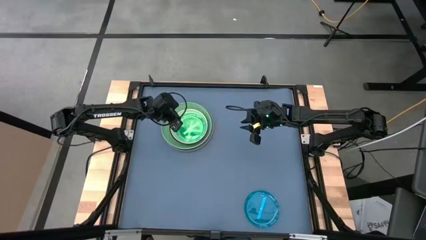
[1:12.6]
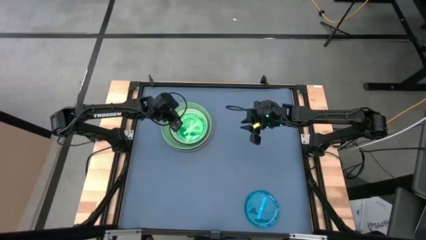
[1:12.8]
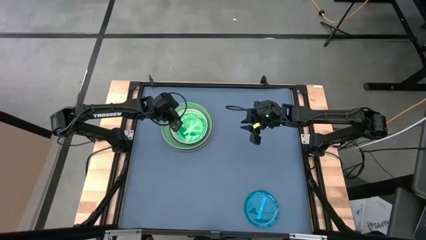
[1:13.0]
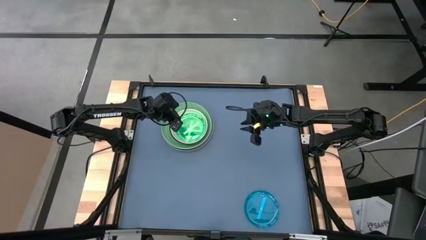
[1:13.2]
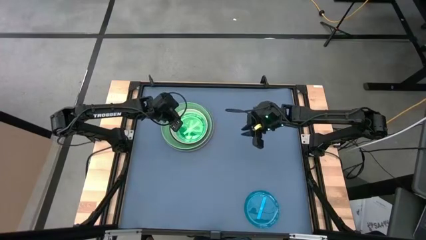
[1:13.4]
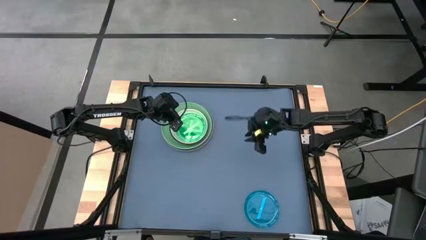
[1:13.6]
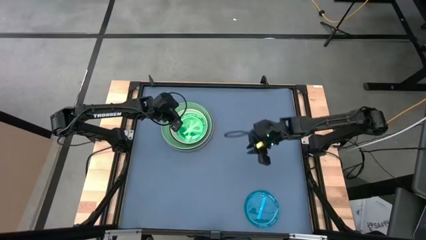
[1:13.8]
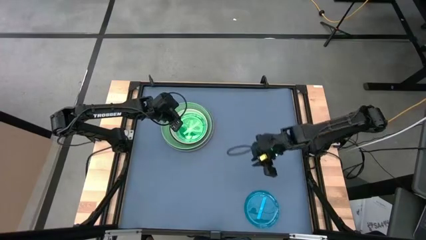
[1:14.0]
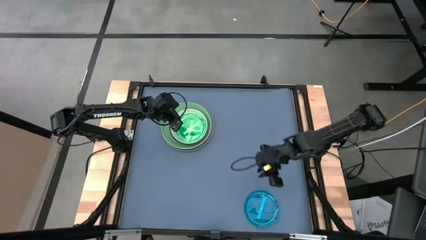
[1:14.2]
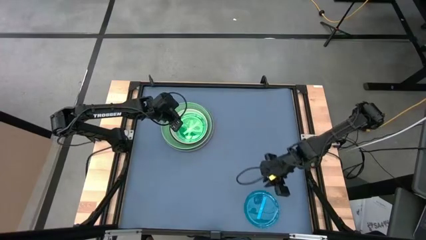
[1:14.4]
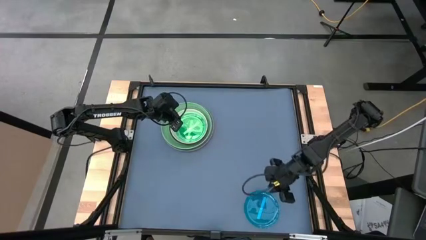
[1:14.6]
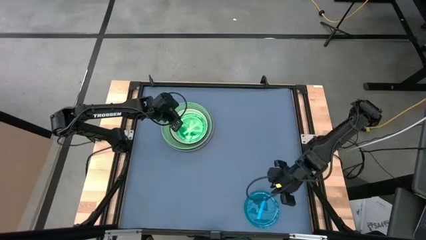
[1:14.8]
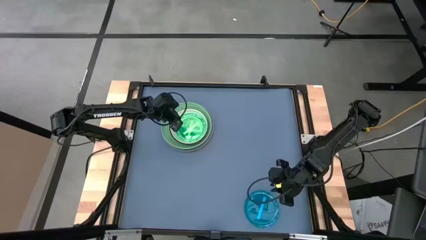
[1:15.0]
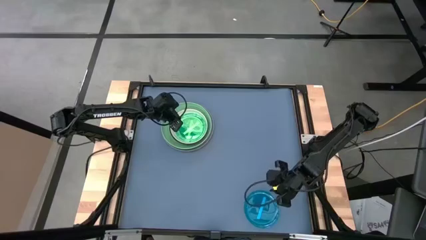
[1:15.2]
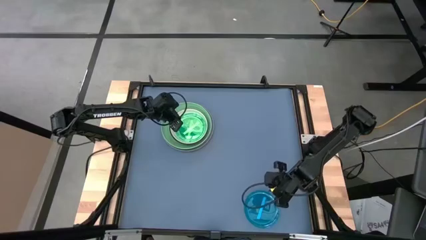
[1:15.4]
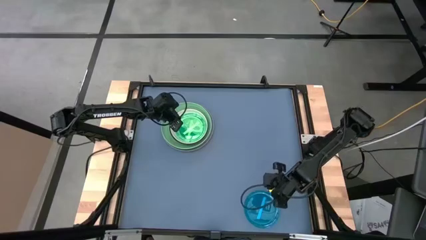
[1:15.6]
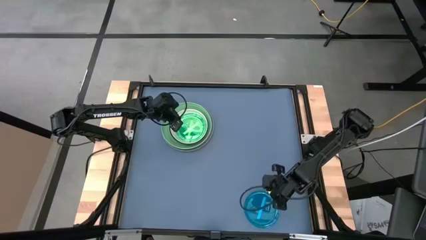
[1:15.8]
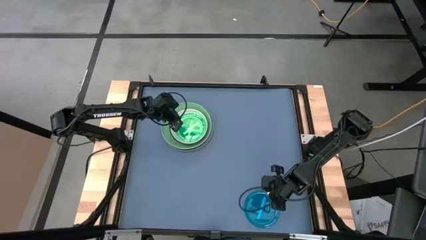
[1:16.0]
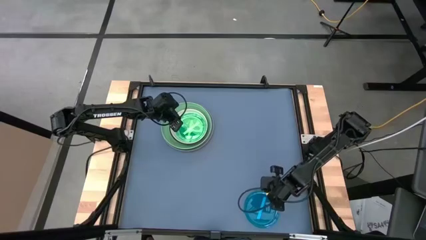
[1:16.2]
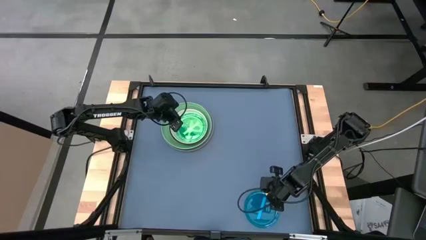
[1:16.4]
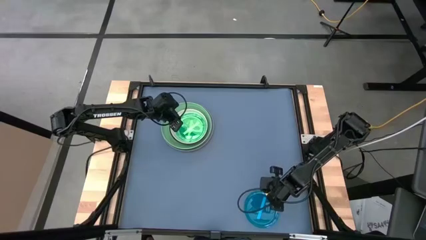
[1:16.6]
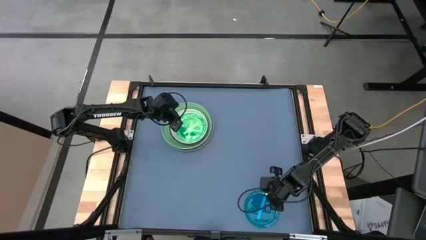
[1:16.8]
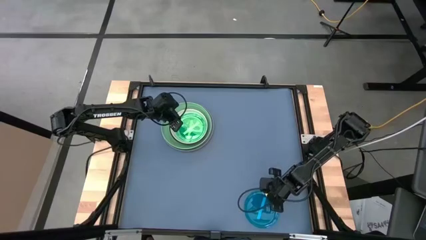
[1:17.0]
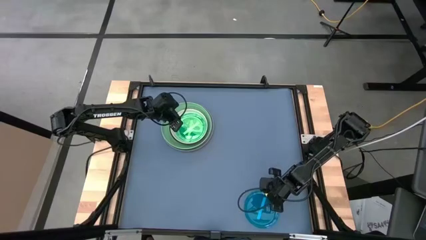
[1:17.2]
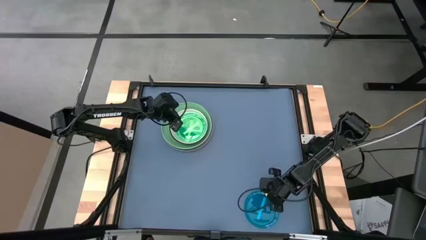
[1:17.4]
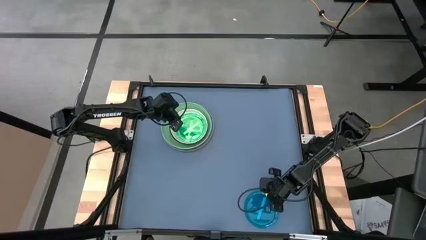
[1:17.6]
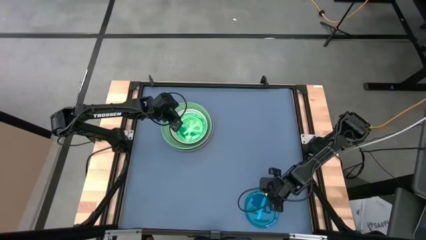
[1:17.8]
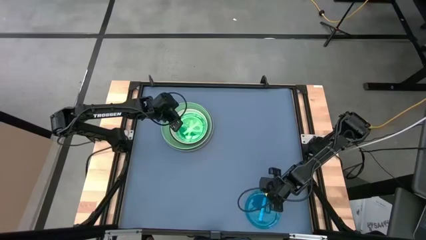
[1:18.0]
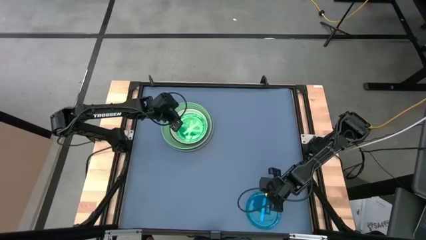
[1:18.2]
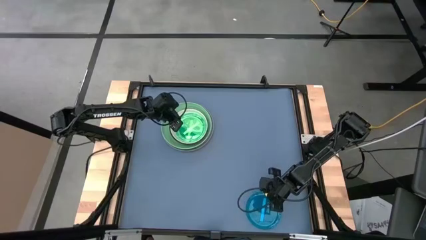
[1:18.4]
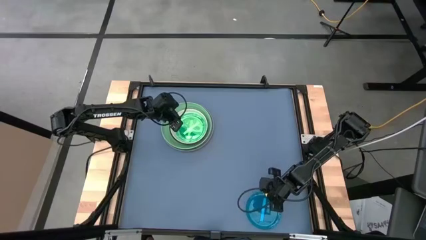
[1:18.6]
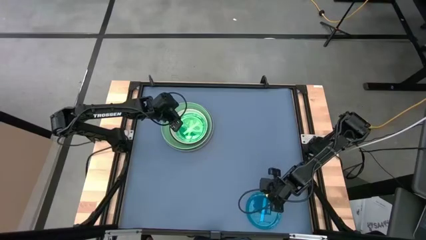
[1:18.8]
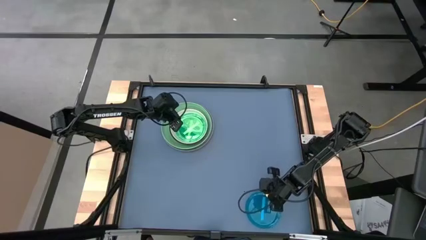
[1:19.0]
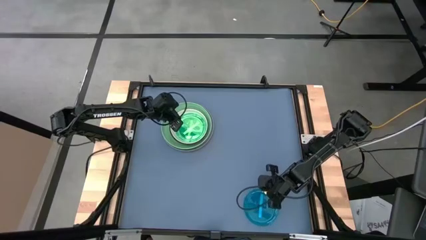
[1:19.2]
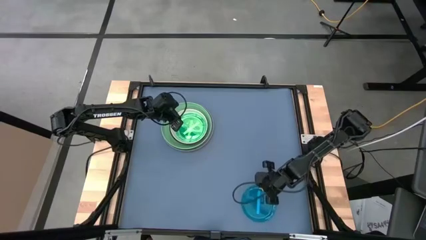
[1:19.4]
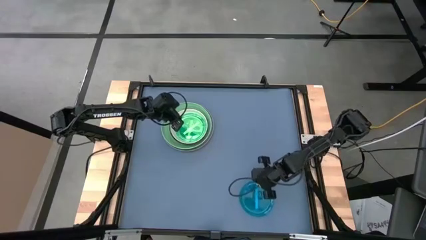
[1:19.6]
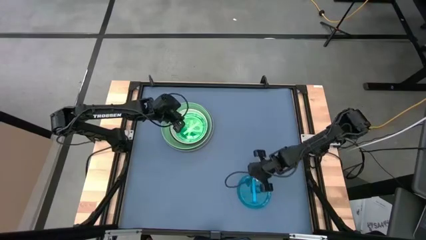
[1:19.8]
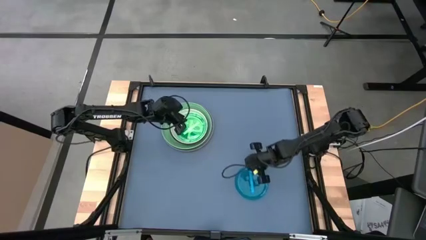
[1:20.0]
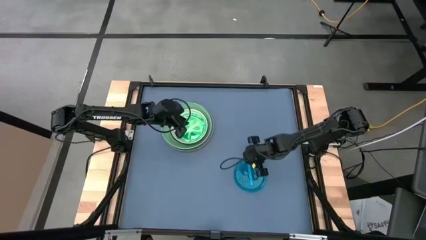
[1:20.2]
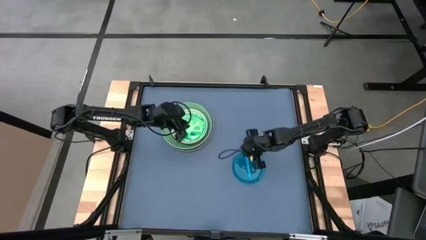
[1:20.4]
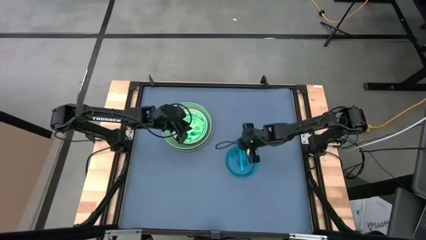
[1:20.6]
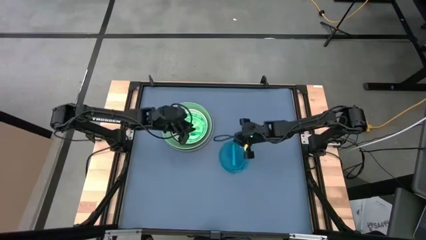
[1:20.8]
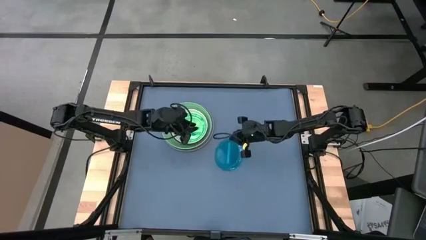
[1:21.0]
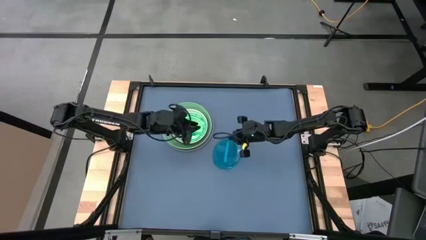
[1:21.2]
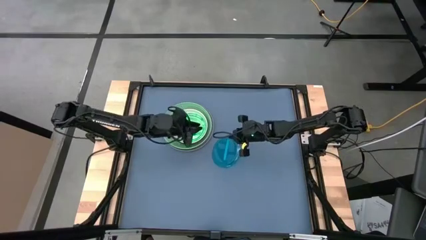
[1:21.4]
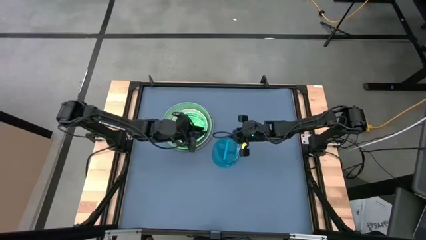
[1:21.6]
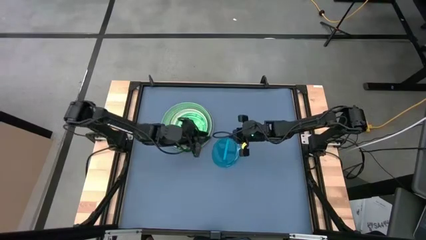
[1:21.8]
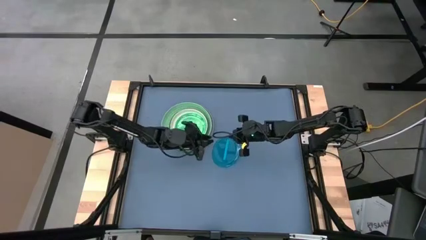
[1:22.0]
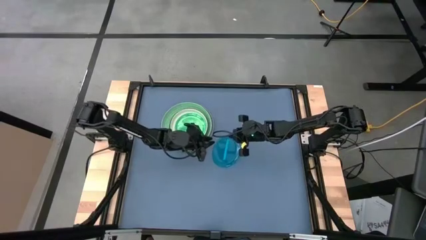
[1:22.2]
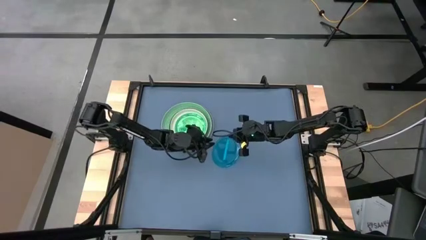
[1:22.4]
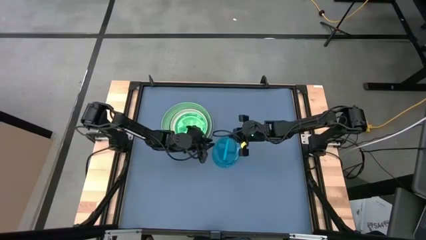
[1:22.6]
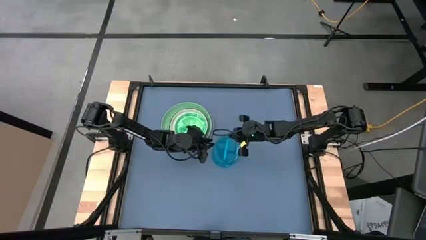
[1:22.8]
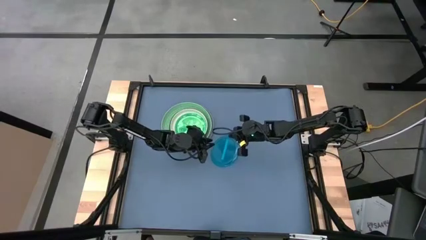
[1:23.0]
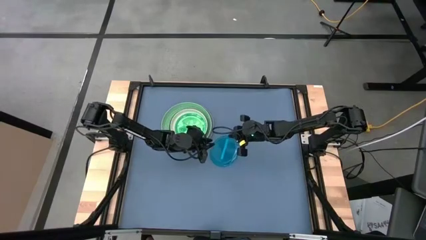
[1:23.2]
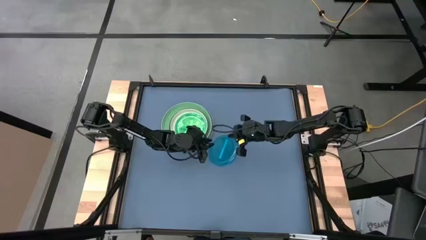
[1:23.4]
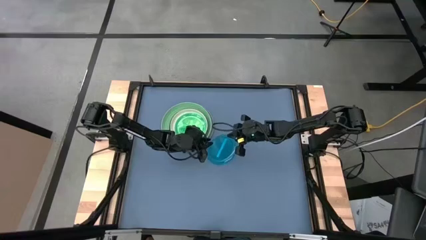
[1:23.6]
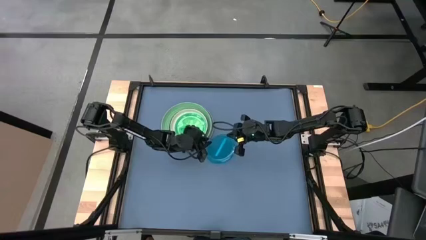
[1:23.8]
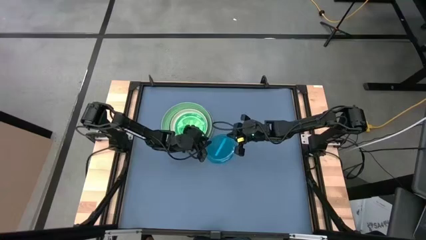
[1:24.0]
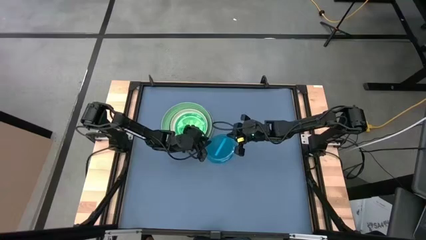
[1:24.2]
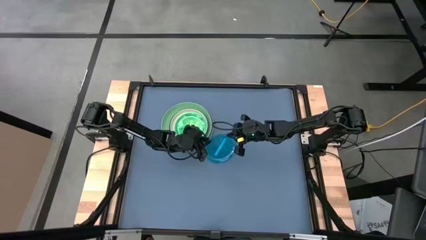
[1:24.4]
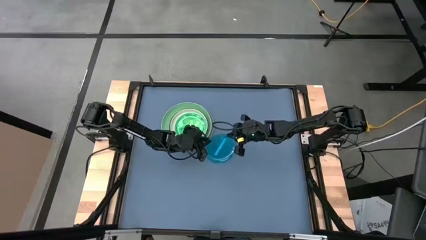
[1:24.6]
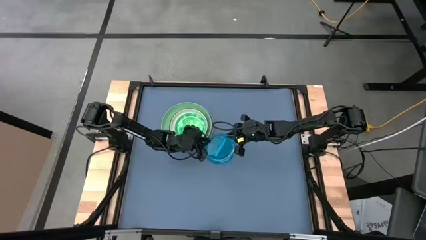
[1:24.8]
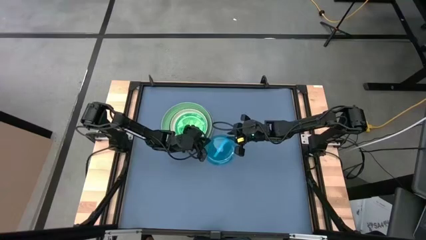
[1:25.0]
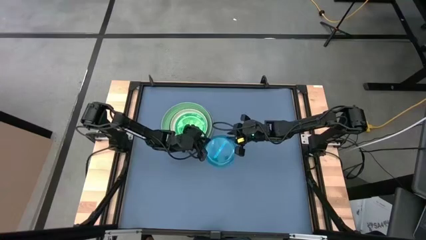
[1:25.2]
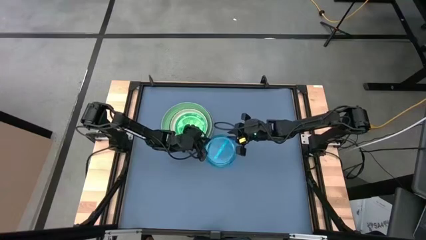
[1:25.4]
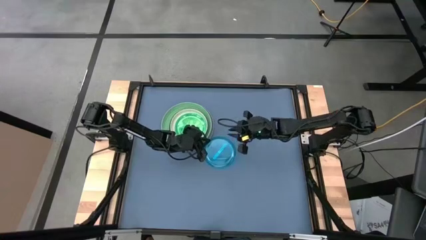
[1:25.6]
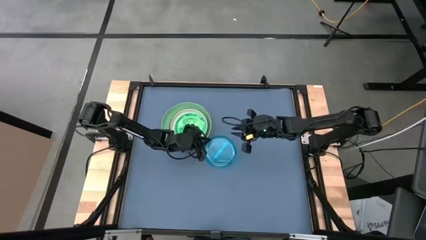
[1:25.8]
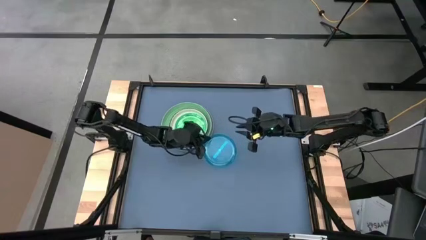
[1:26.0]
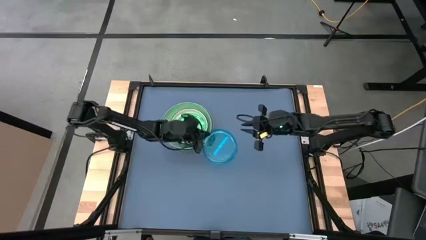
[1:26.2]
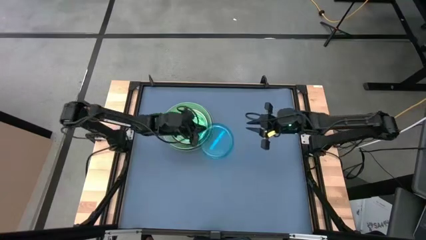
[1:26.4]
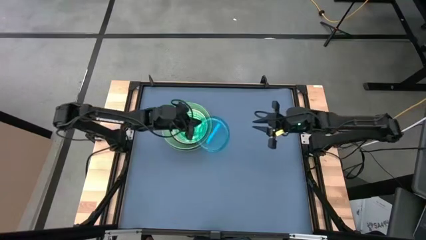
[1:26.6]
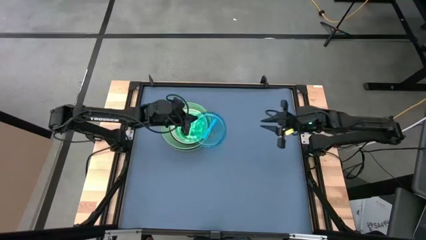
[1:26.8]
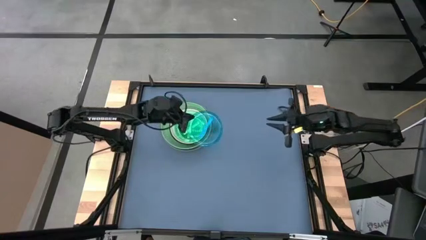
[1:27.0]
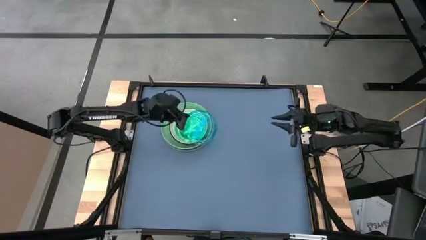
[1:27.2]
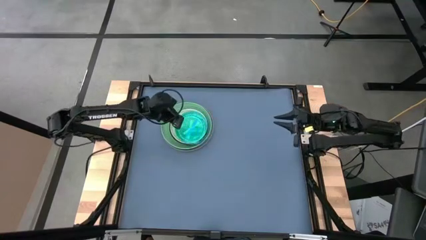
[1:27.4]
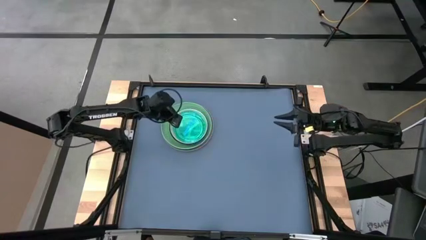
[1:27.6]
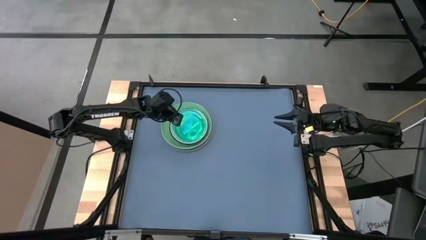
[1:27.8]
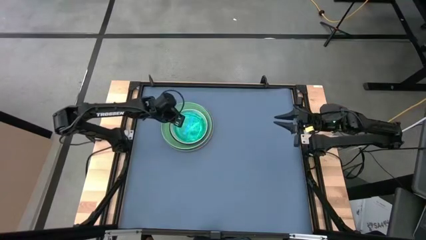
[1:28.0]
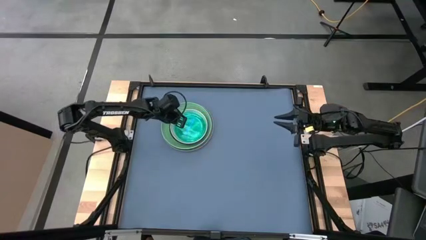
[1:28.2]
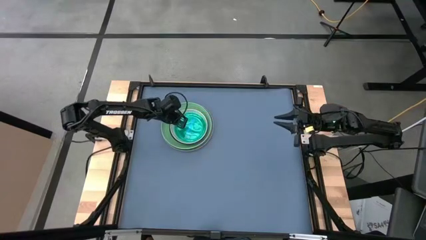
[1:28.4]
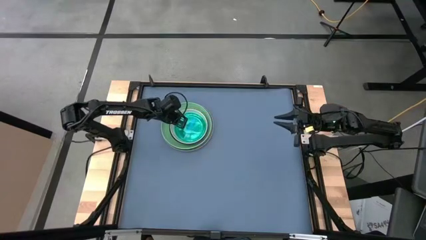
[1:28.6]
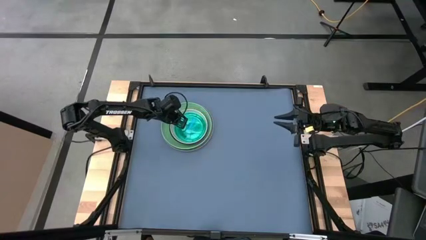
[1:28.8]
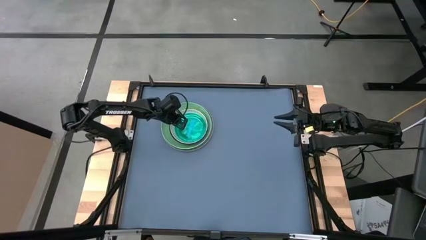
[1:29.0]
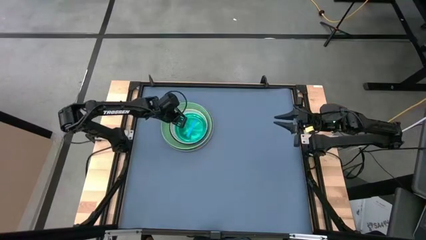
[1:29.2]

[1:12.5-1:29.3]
Task: Stack plastic plates
Stack the blue plate on top of the light green plate
